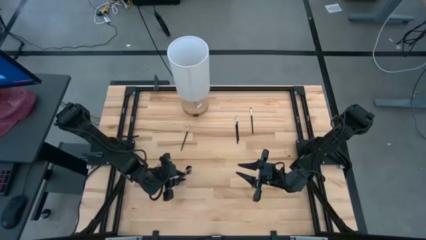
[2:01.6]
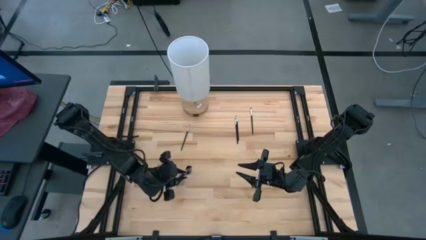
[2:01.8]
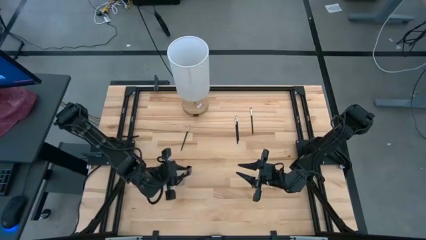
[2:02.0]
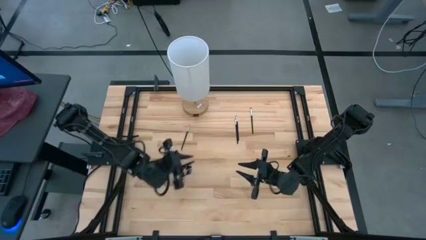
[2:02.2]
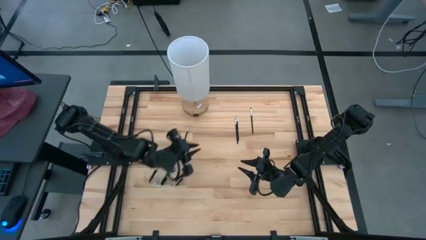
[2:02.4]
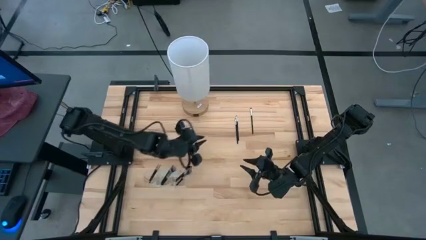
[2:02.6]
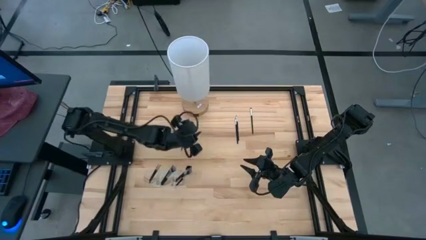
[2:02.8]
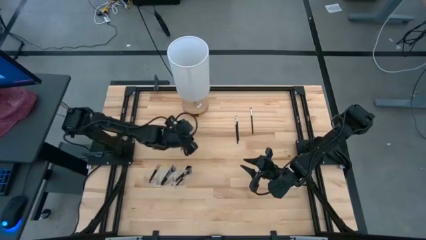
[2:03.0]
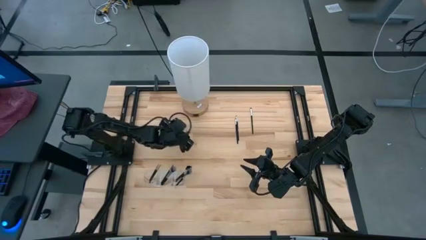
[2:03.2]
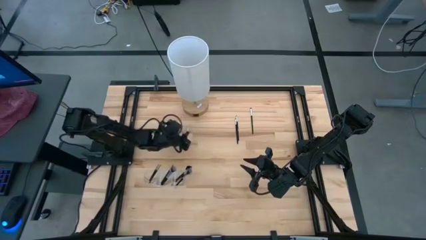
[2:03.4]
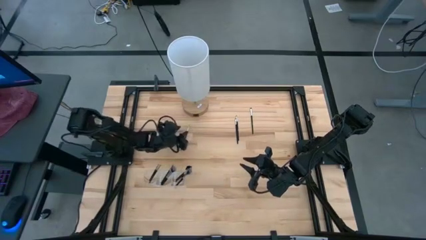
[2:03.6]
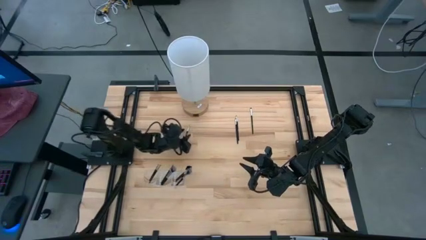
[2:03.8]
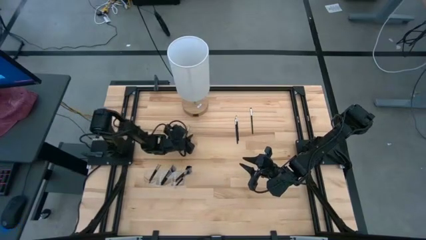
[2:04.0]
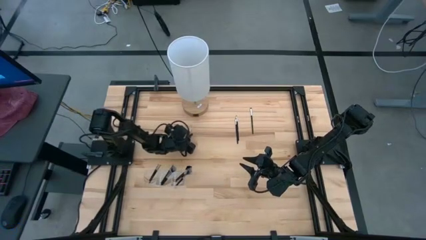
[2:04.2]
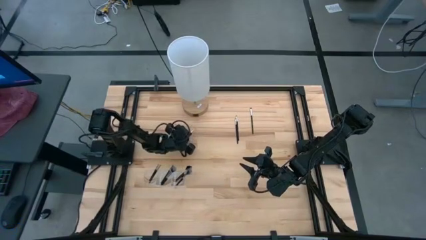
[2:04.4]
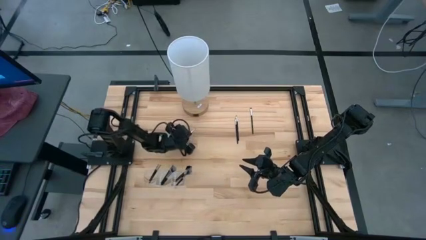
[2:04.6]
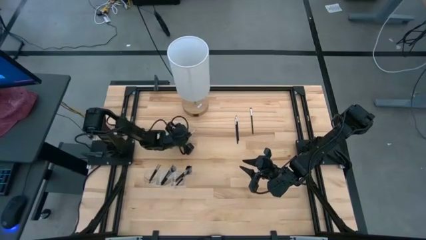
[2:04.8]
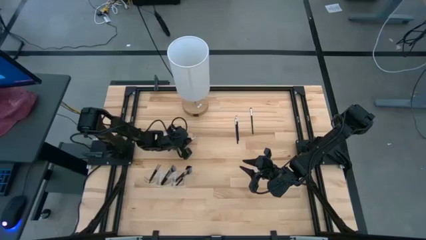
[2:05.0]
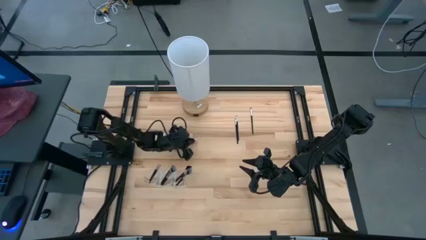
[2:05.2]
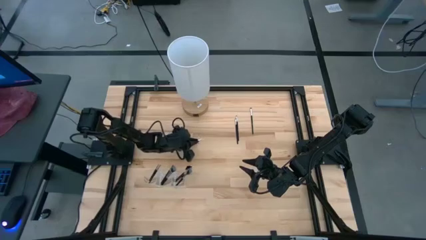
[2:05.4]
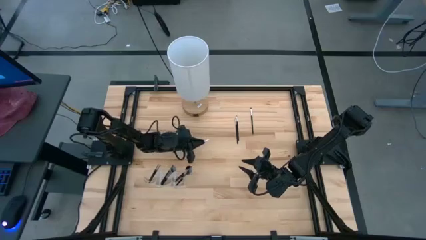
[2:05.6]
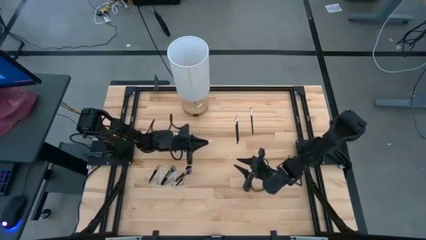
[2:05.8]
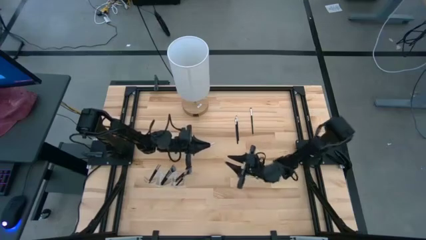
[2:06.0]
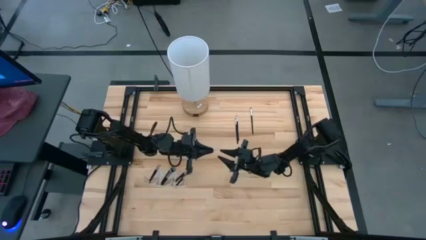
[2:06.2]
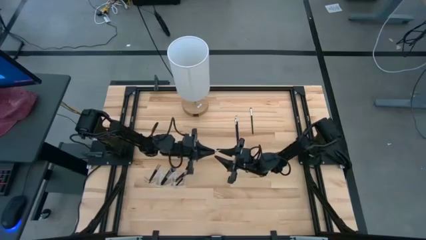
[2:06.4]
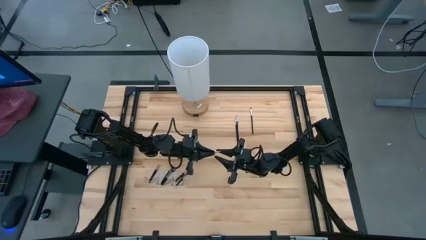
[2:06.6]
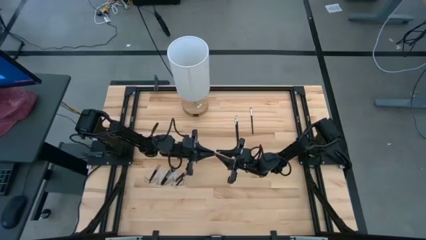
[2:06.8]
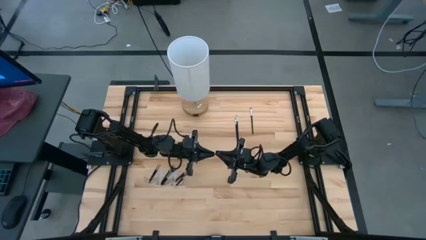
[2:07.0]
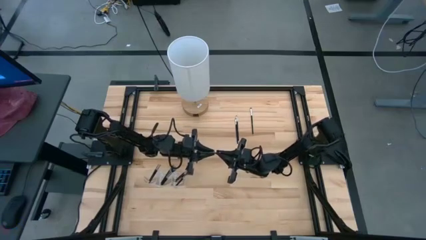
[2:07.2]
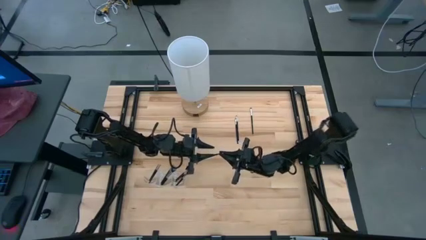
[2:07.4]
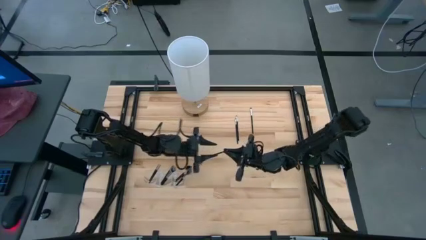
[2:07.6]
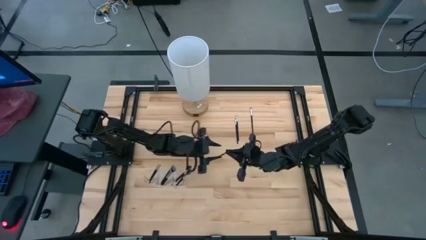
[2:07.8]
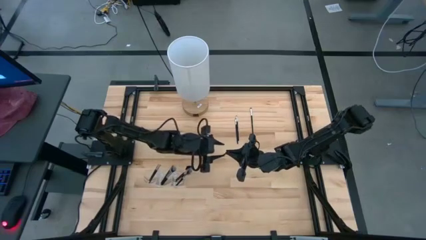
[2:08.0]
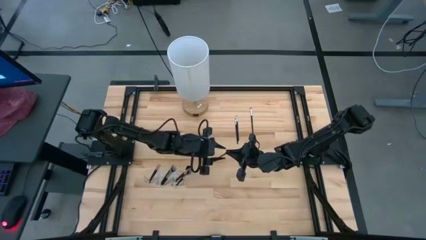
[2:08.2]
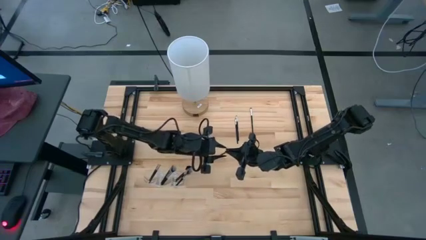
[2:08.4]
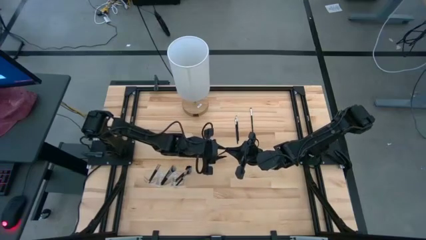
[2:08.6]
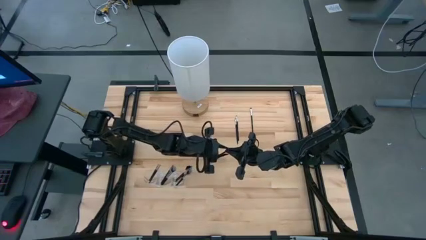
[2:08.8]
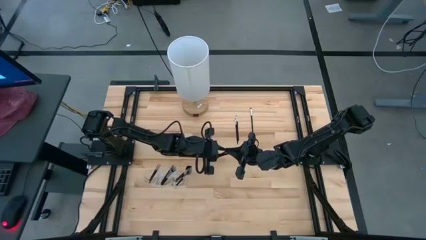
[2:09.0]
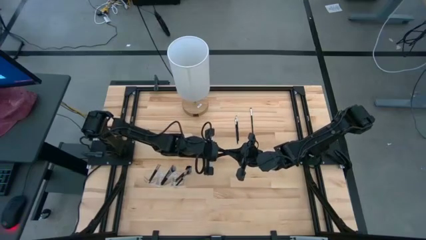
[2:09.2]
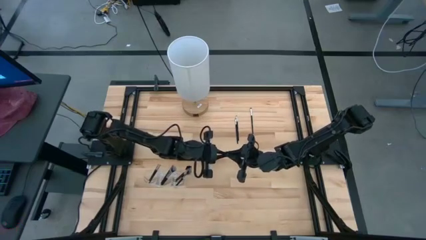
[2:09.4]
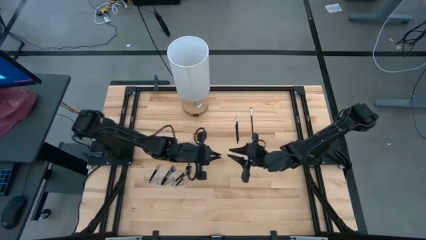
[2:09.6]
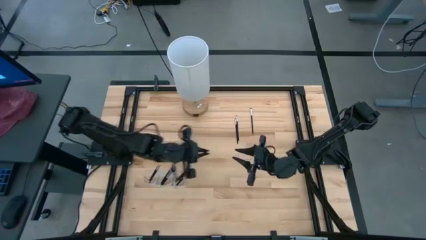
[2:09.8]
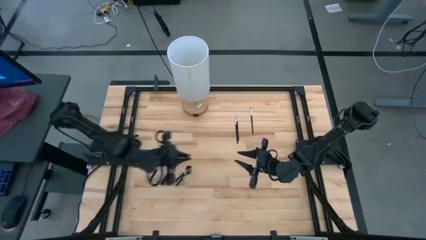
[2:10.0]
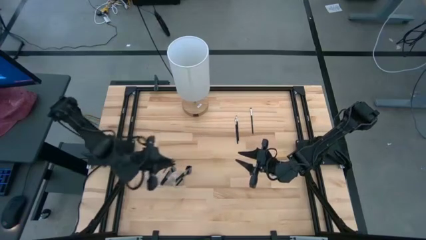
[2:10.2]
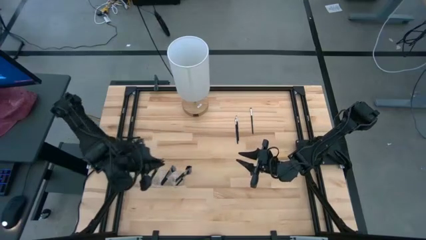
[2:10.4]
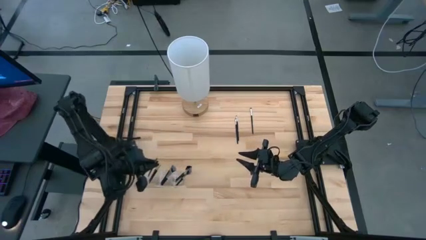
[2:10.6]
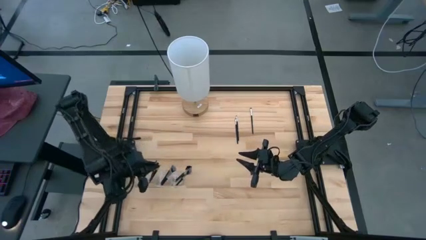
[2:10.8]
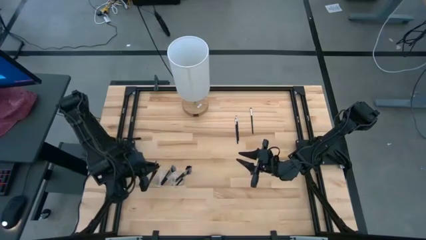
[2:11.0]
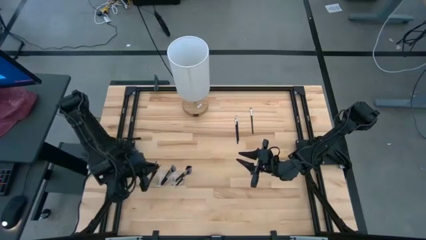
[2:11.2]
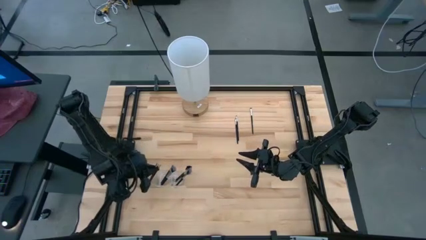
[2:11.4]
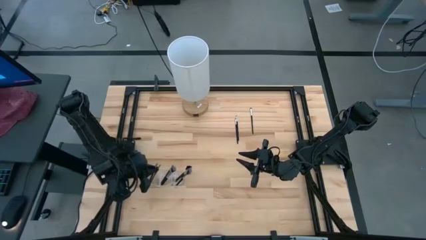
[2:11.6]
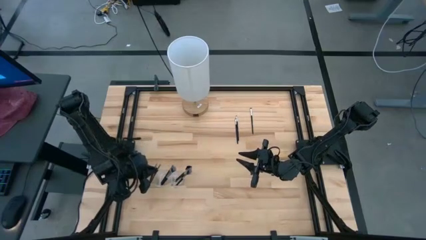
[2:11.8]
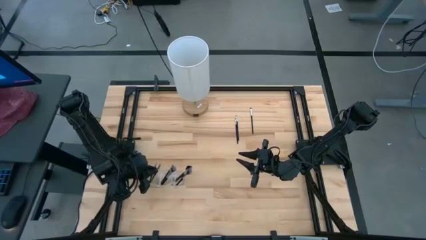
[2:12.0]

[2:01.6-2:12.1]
Task: Put items in baskets/containers
Put the liner brush in the transparent organizer

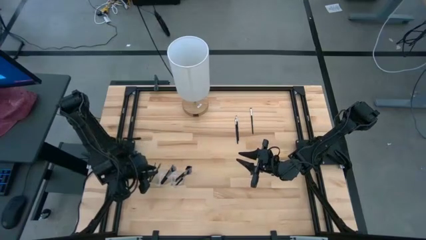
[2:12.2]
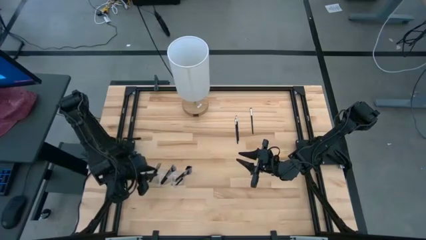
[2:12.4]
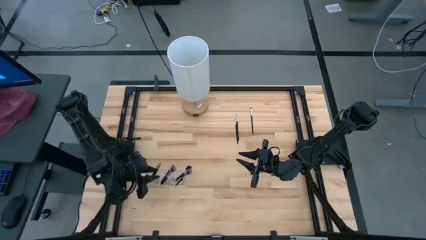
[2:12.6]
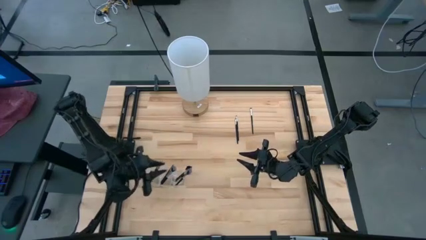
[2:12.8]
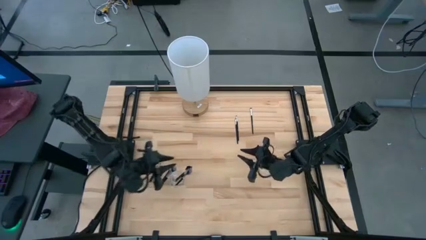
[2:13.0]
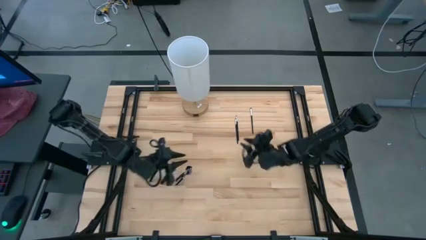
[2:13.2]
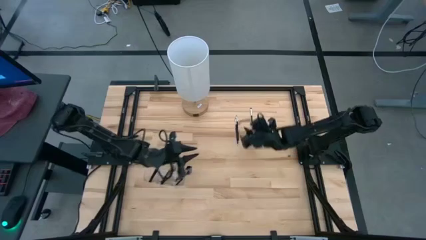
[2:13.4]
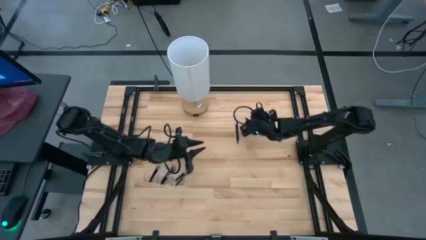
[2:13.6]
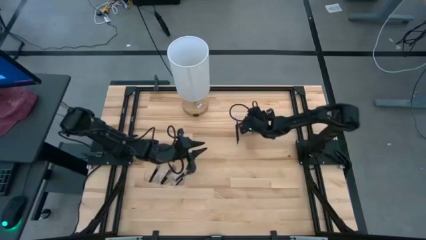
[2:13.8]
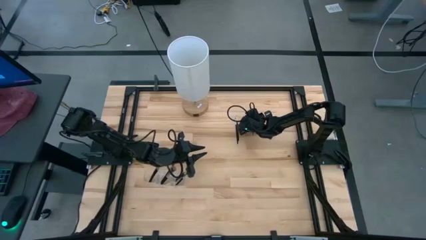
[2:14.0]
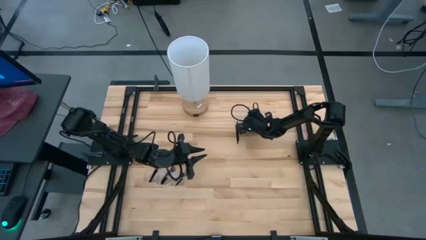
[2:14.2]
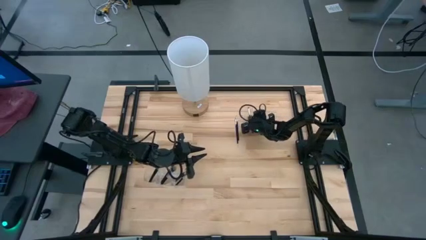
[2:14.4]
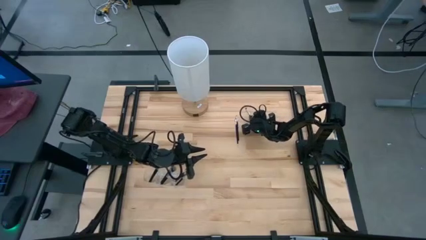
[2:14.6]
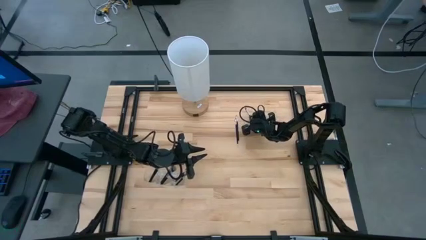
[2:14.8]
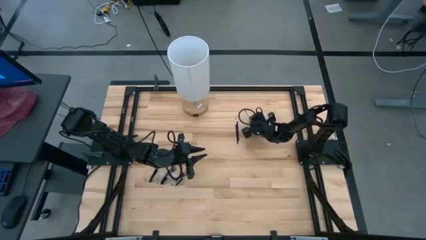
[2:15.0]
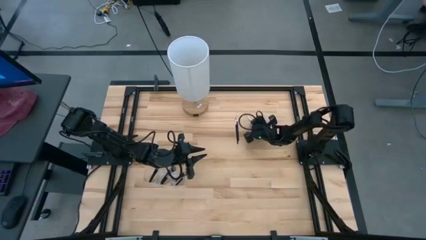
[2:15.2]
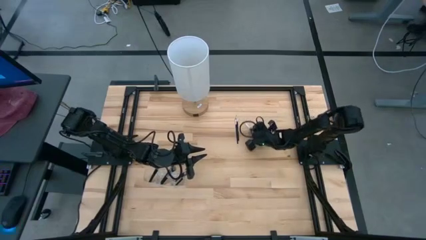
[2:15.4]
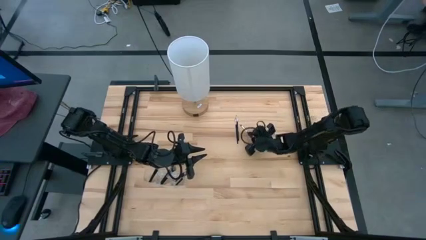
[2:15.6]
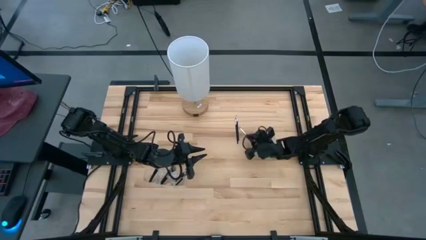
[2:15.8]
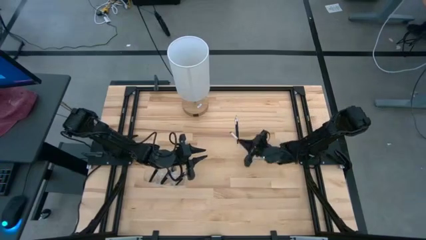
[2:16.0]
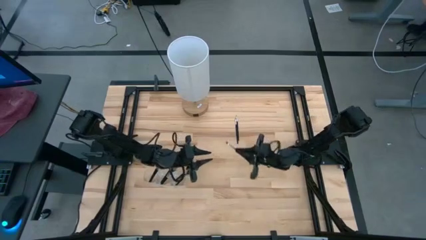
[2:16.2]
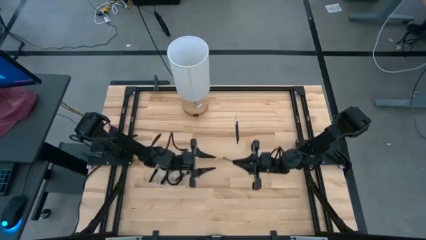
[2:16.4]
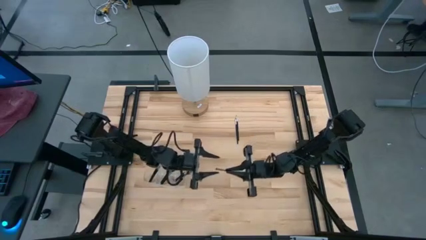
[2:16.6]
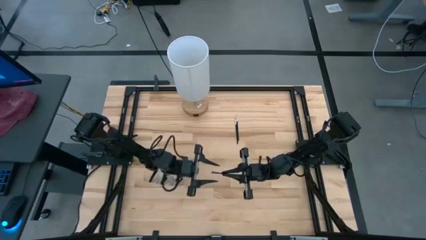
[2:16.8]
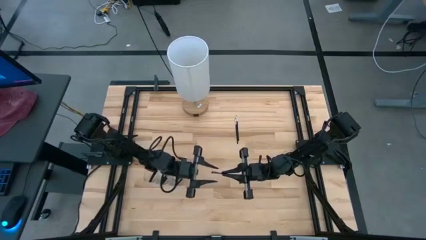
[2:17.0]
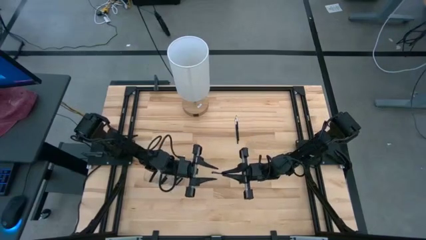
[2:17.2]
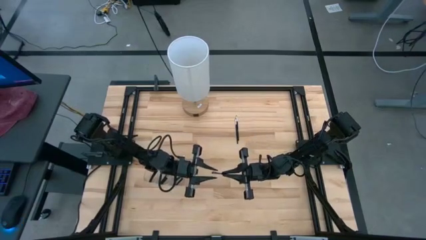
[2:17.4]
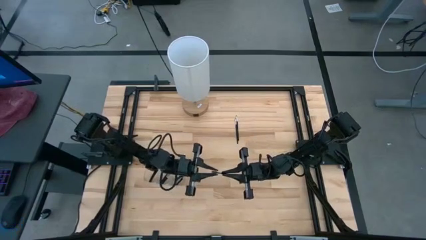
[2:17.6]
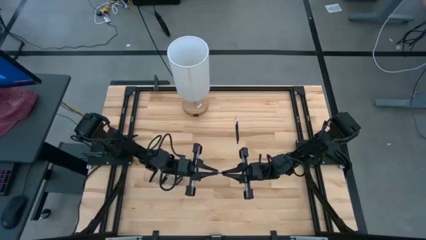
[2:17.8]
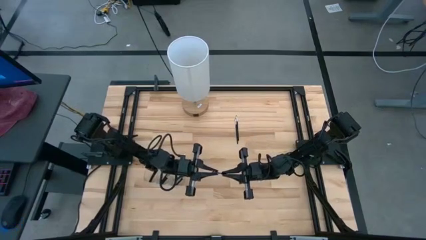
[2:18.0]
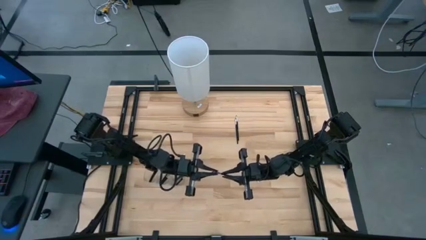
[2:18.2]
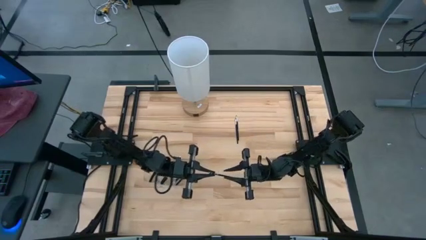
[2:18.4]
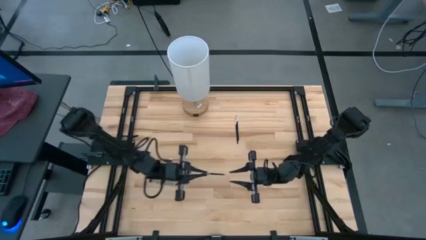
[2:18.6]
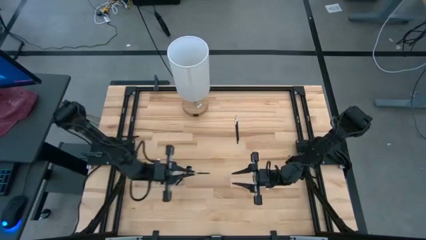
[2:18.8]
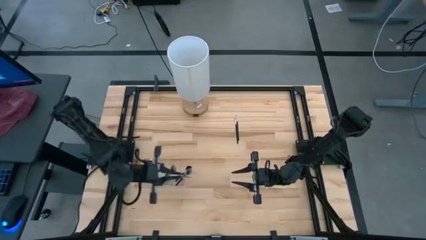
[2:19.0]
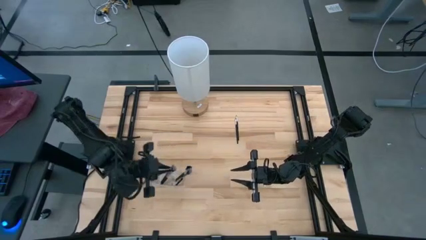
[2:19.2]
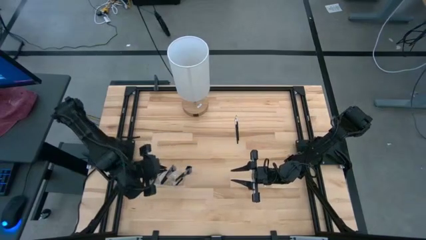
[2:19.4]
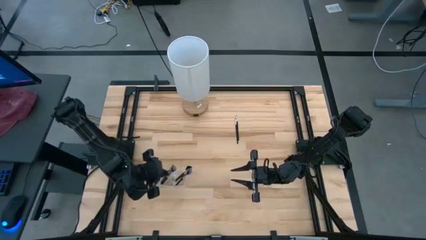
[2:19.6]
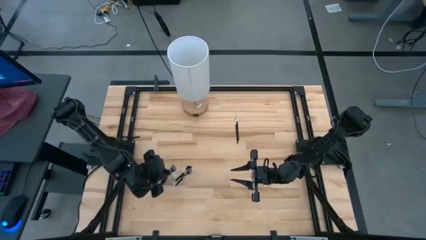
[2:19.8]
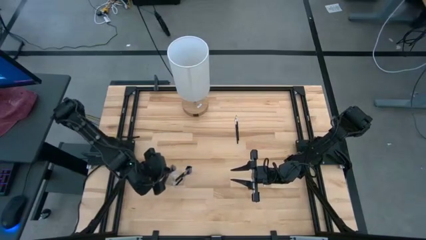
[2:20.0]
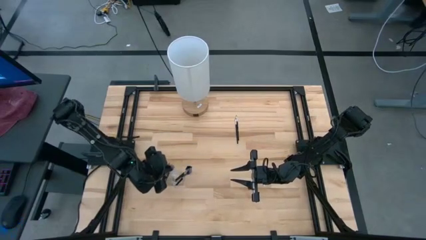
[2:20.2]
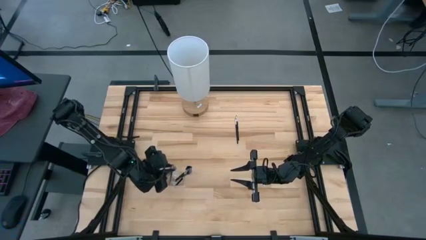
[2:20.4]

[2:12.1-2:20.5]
Put the foundation brush in the transparent organizer
